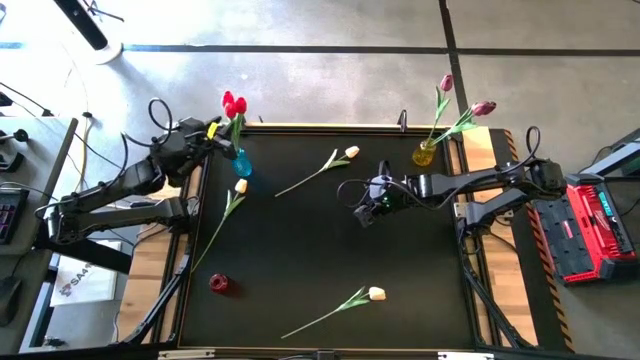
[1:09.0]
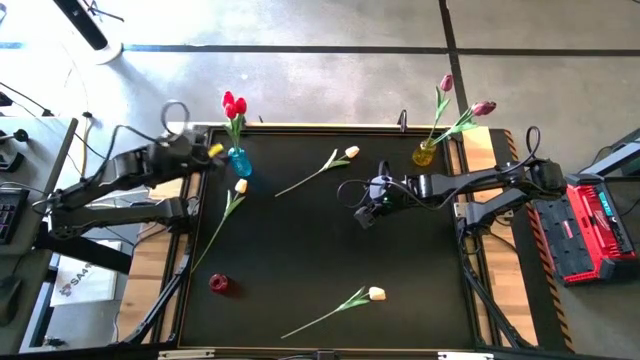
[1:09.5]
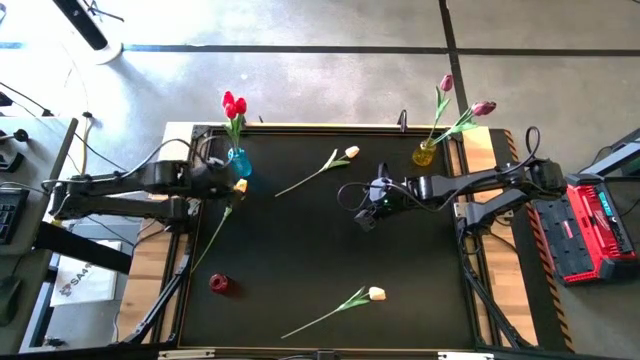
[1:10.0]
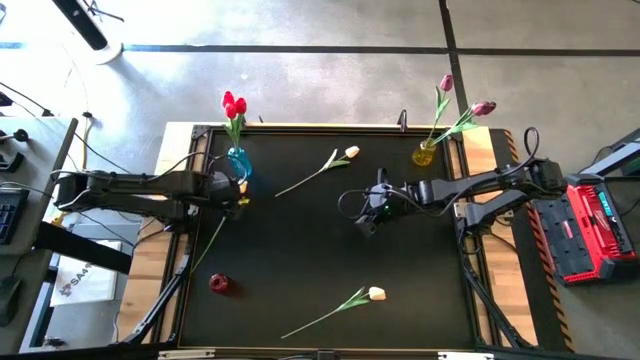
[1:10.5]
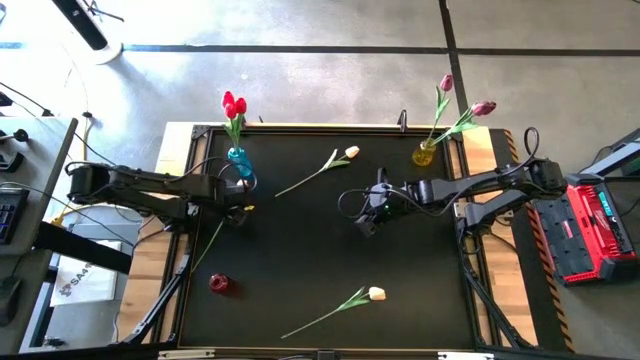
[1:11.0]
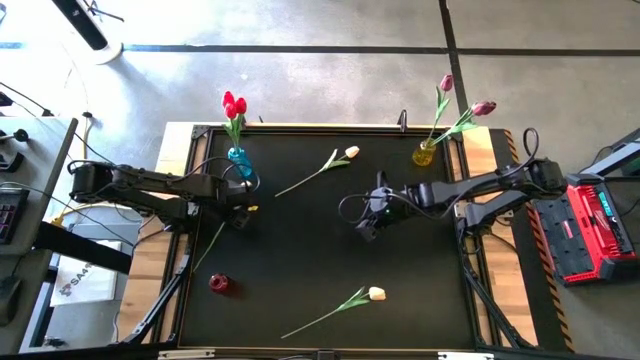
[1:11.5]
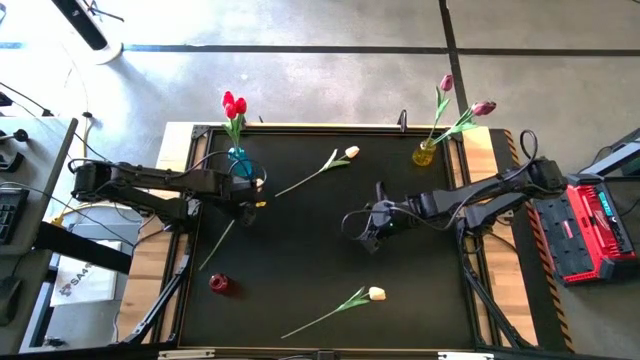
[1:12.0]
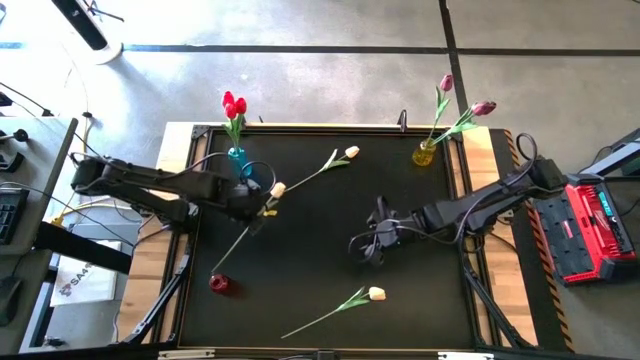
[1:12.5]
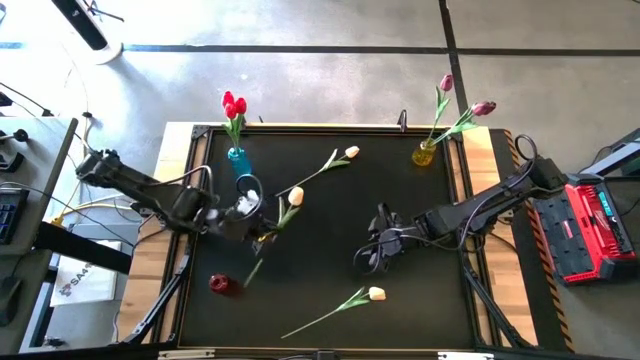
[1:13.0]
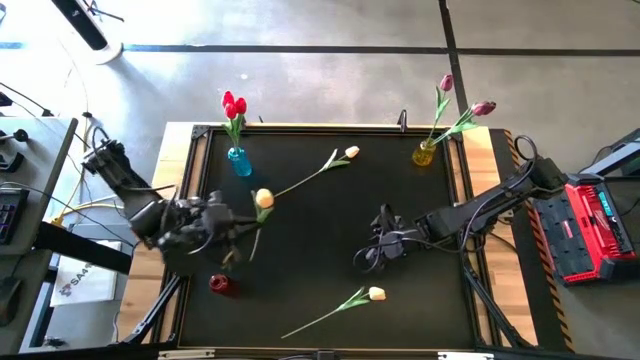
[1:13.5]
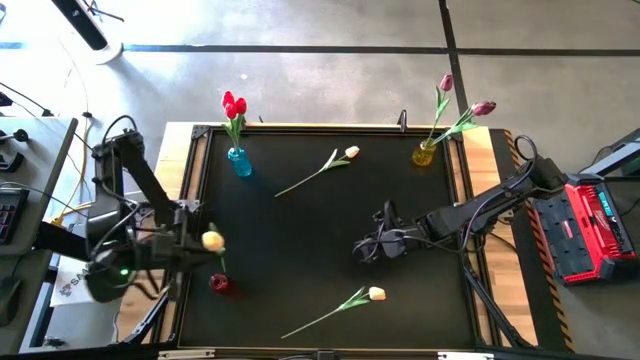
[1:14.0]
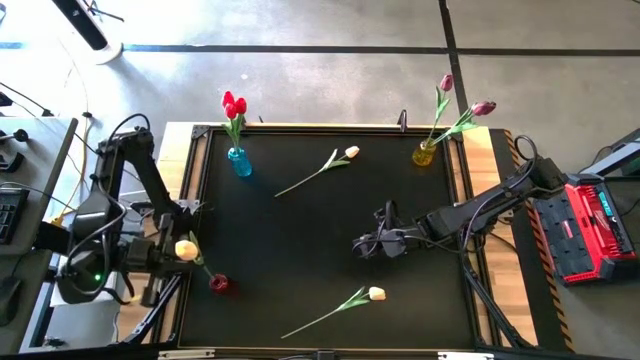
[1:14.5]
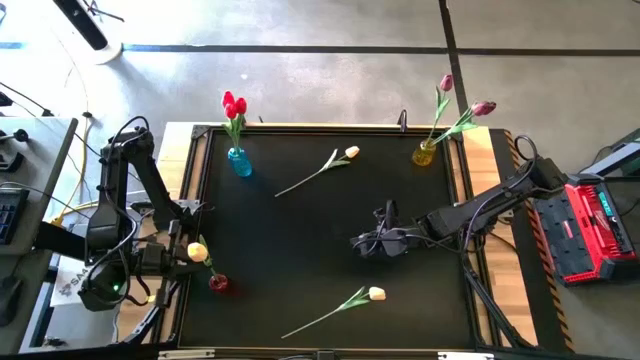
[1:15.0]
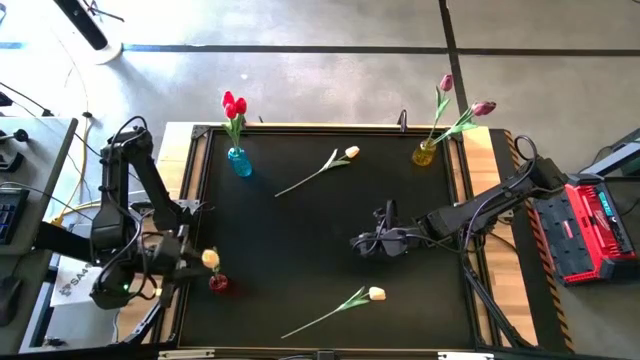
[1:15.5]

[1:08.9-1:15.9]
Task: Sort flowers into vase by color
Put the left yellow flower into the red vase

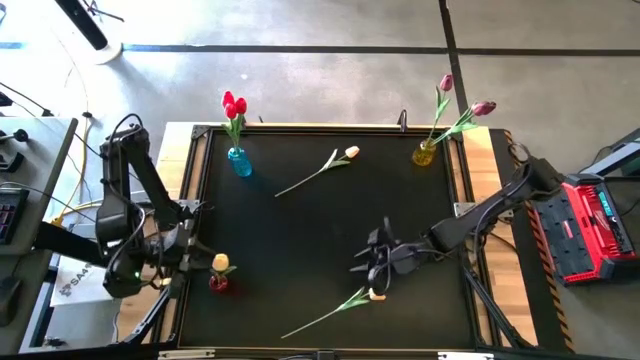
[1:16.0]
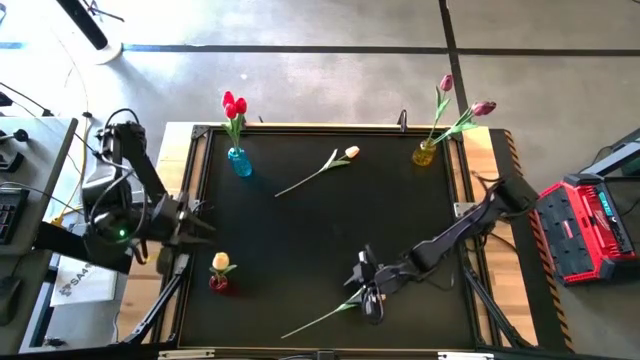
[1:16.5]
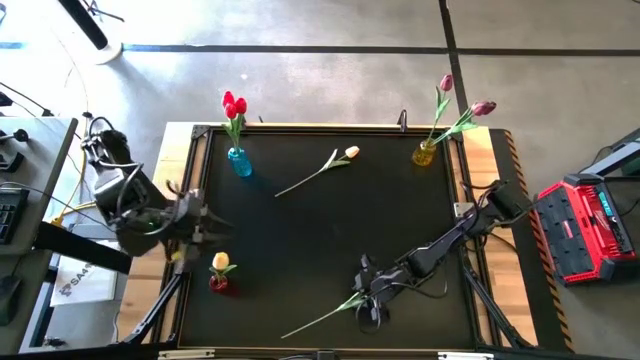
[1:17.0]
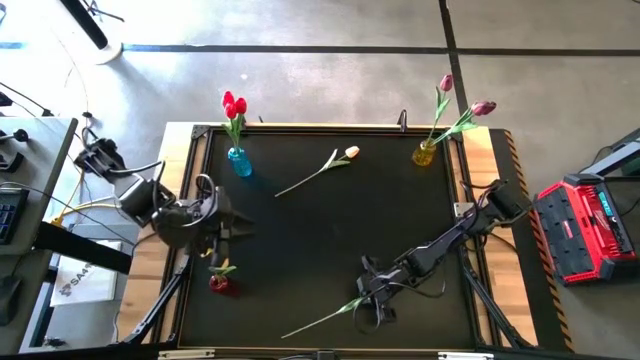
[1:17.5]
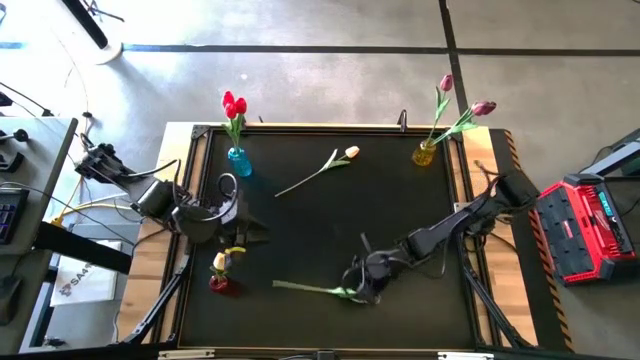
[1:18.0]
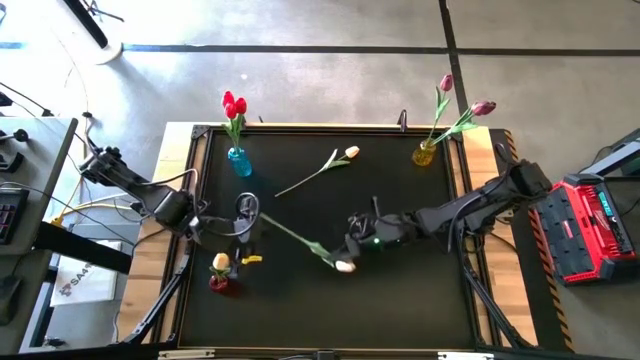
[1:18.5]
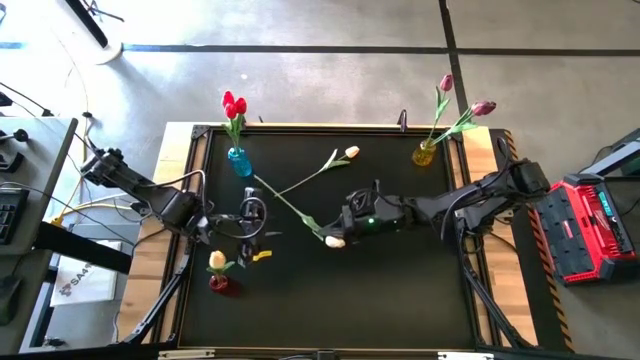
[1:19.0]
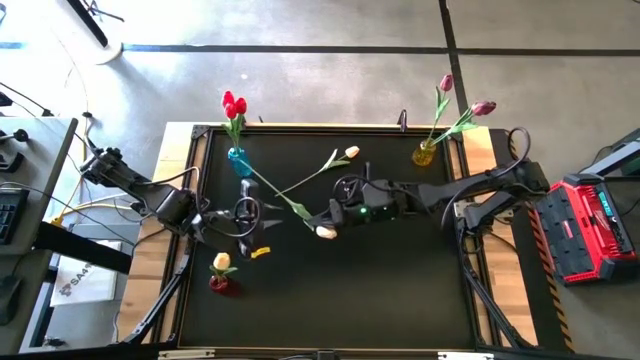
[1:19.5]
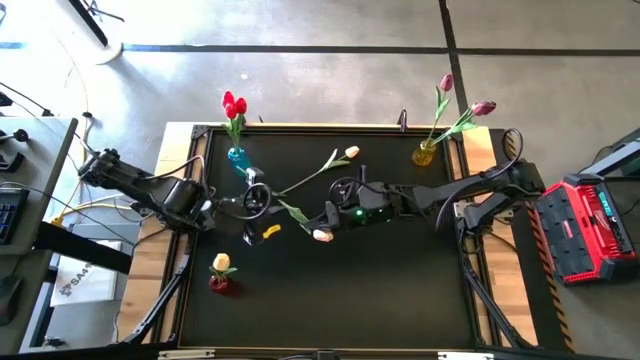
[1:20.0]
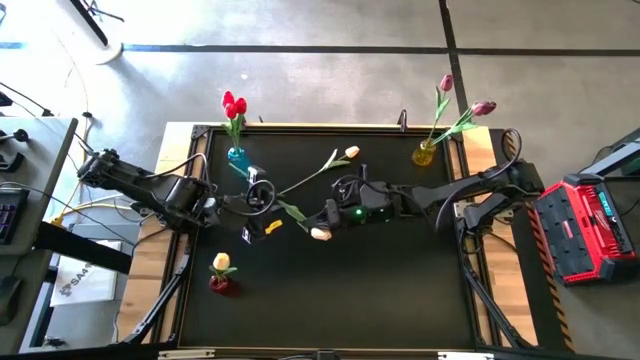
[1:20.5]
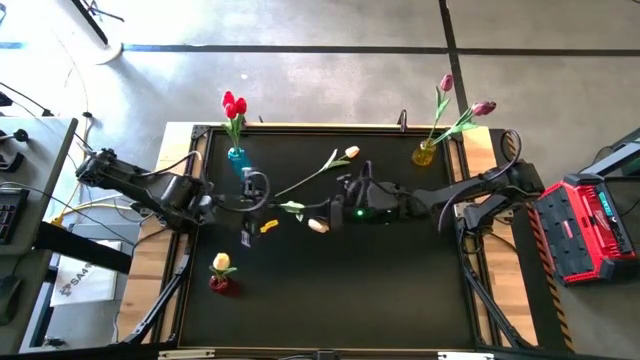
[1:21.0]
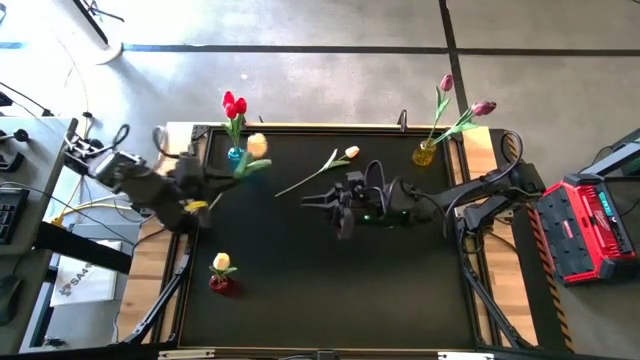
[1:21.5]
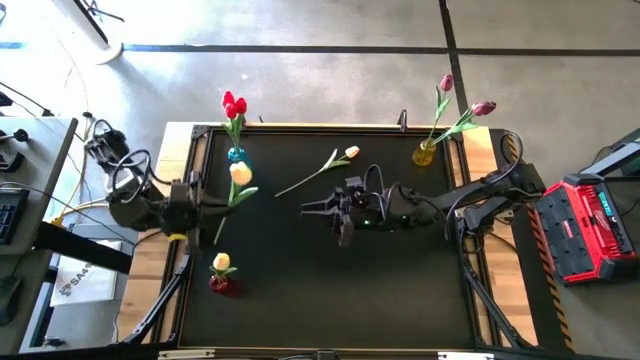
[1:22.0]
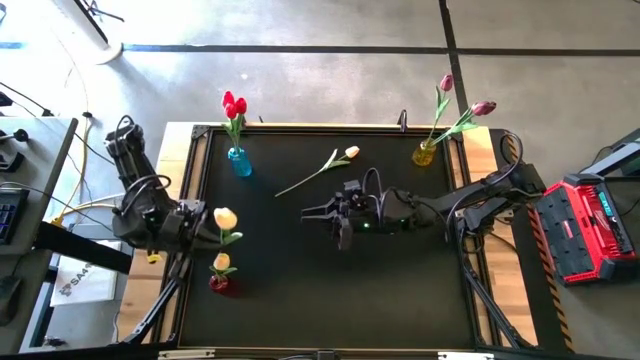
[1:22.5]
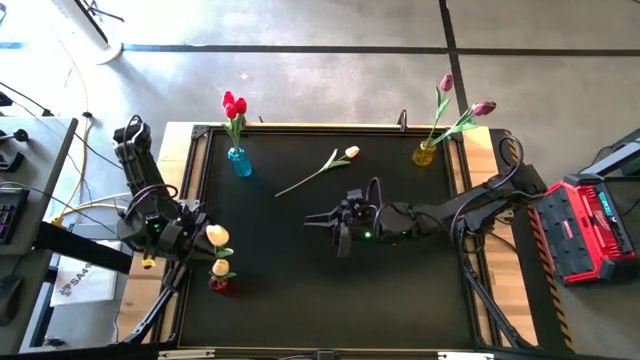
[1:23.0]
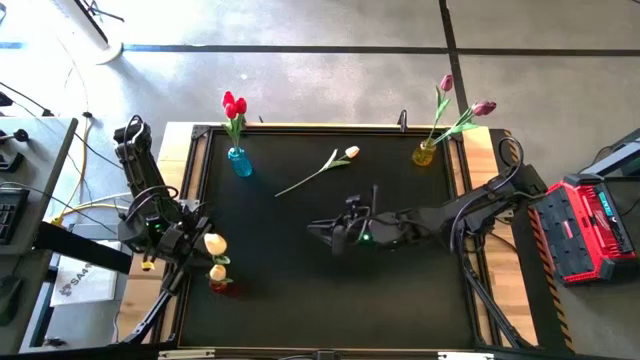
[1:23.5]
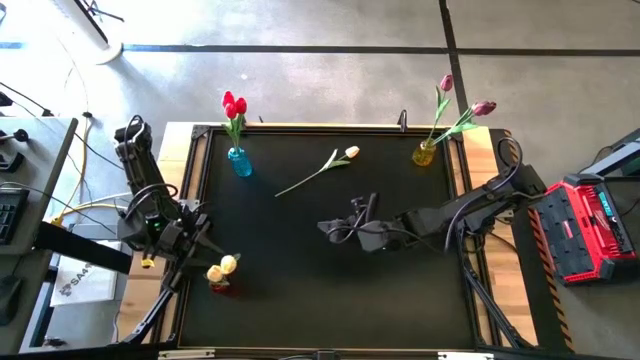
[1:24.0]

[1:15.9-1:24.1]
Put the bottom yellow flower into the red vase

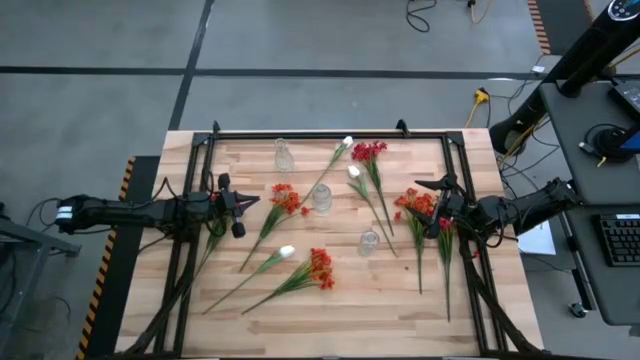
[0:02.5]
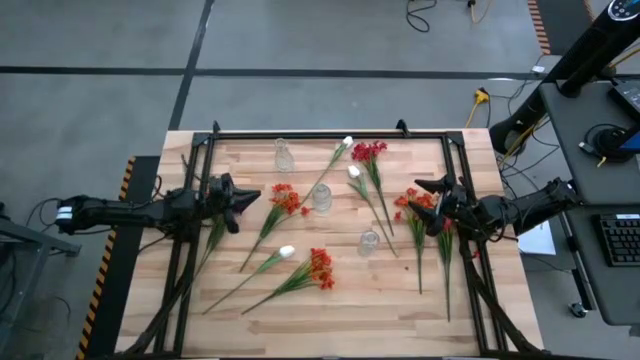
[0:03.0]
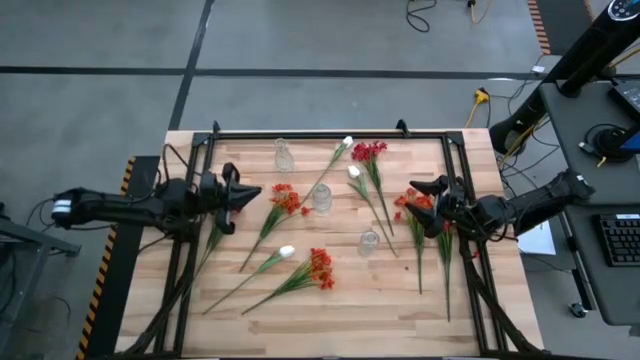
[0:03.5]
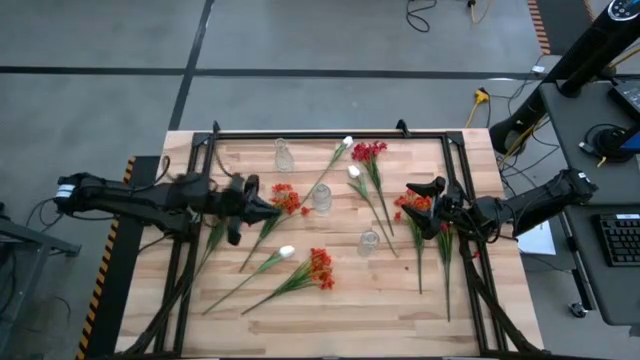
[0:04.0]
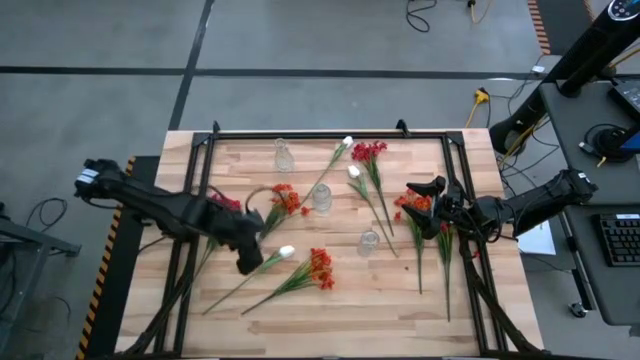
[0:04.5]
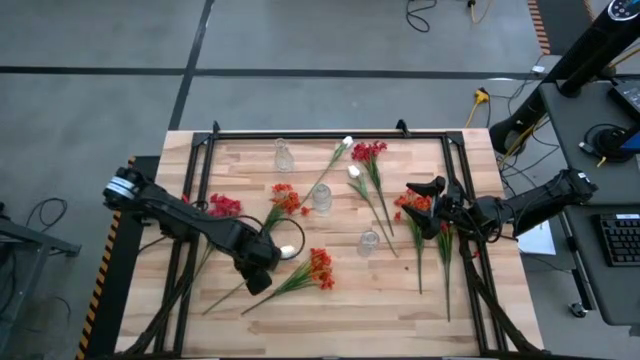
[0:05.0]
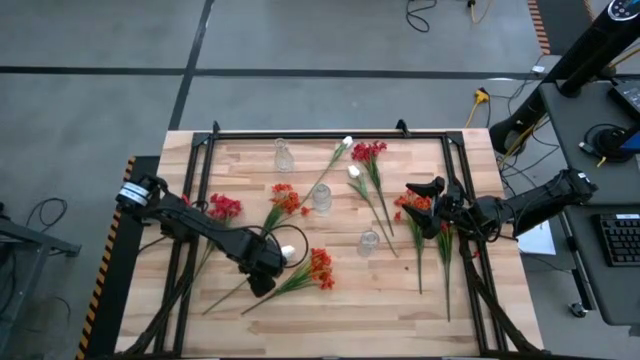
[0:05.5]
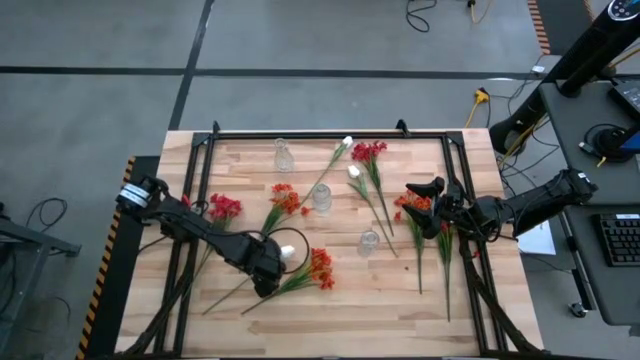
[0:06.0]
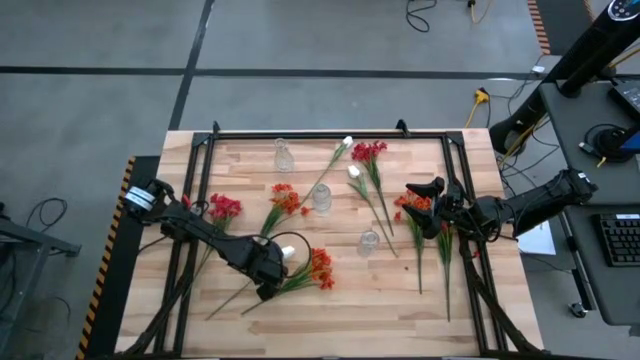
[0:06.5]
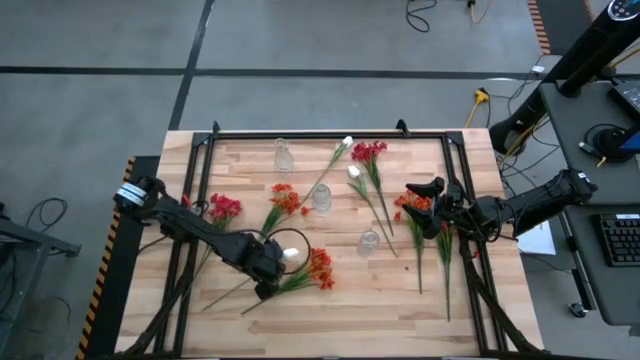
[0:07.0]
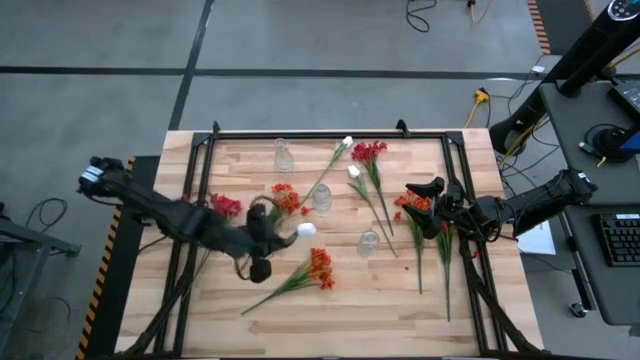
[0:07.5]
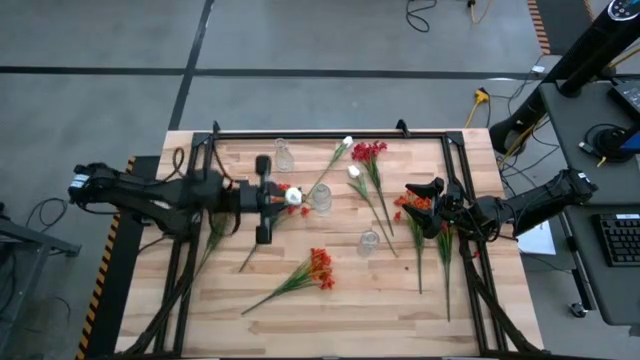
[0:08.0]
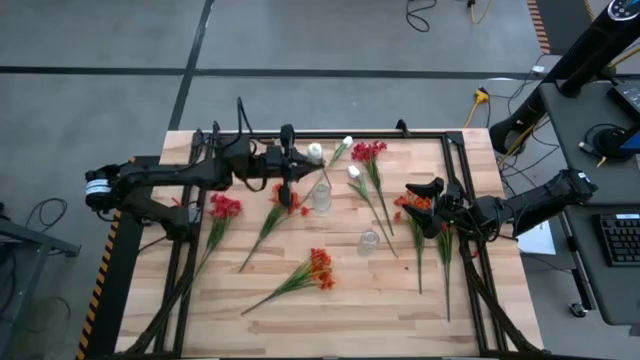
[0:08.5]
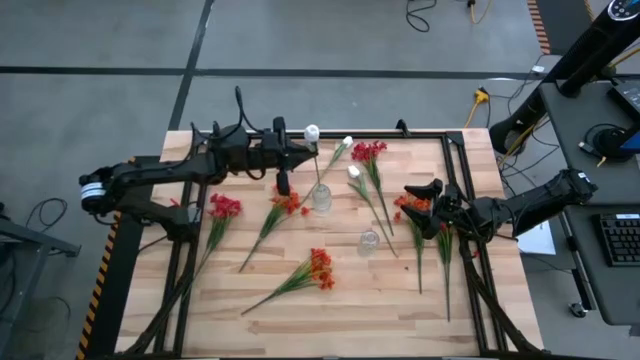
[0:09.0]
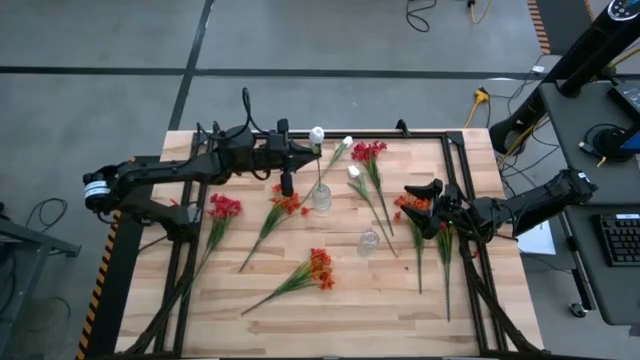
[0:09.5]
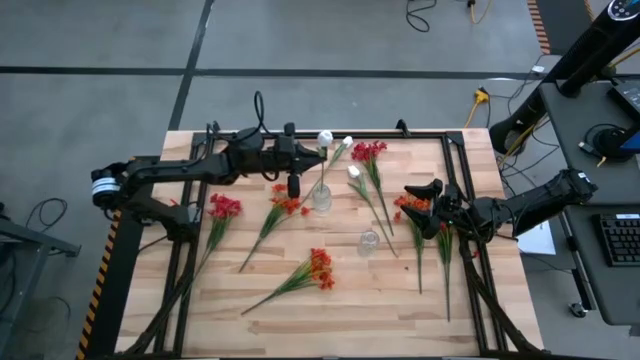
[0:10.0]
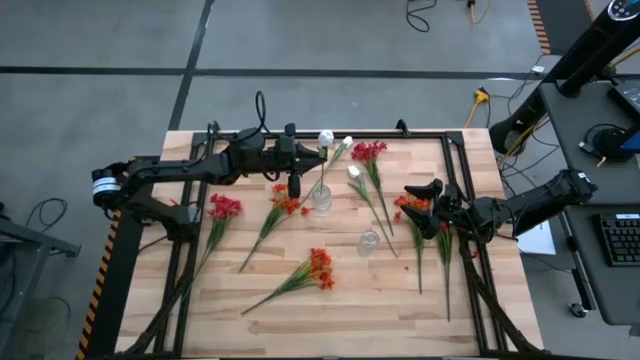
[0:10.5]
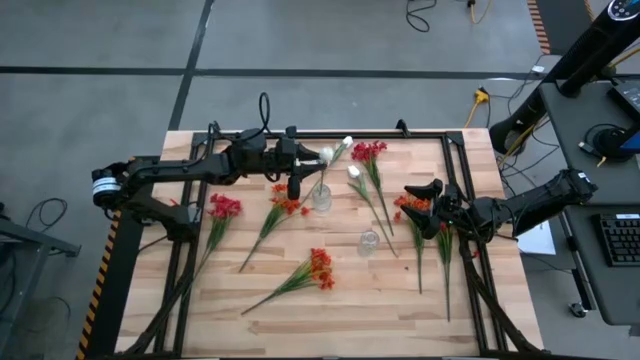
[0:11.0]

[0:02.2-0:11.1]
Task: Sort flowers into vase by color
Put the middle left white tulip flower into the center transparent glass vase
